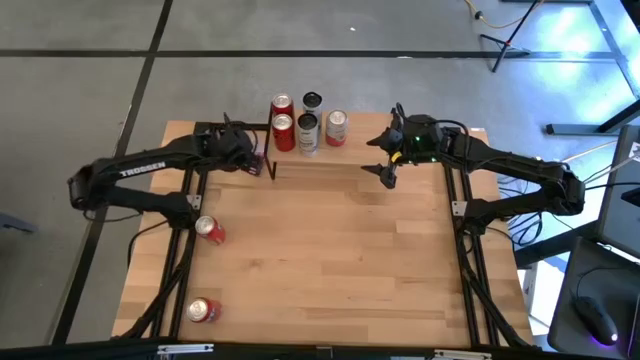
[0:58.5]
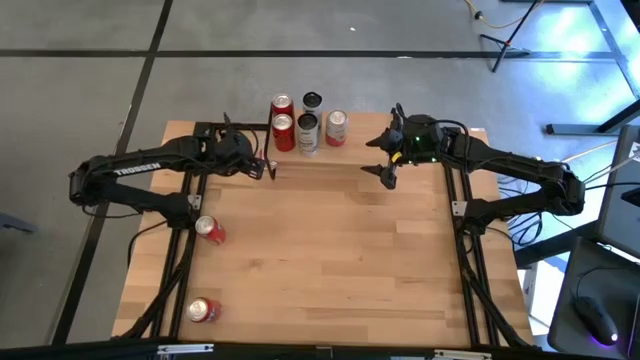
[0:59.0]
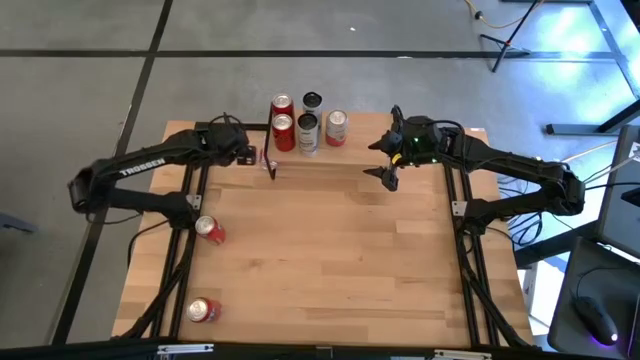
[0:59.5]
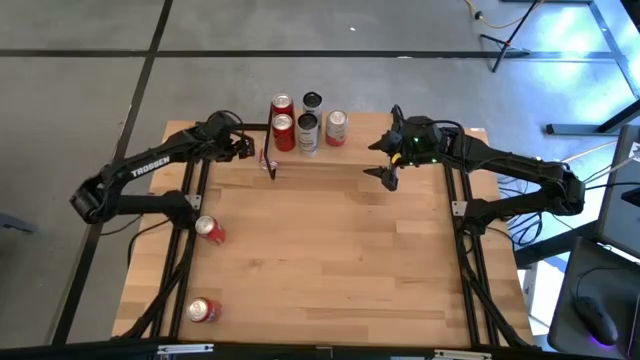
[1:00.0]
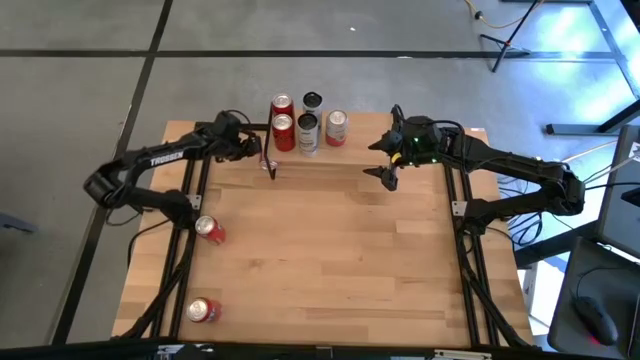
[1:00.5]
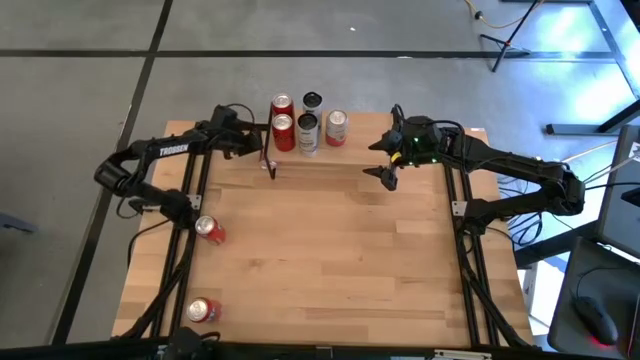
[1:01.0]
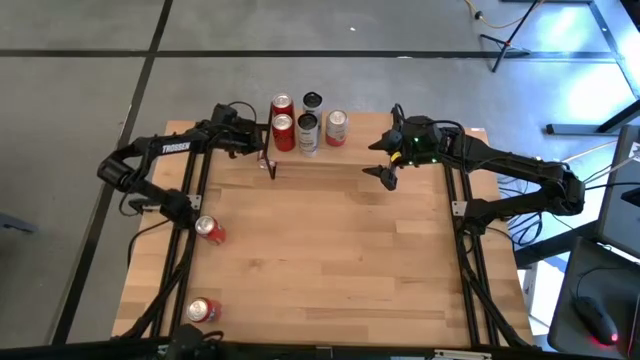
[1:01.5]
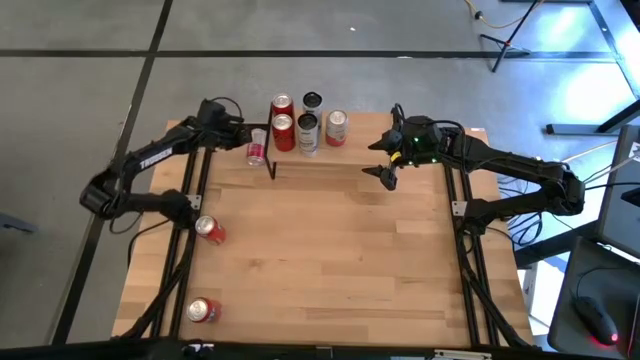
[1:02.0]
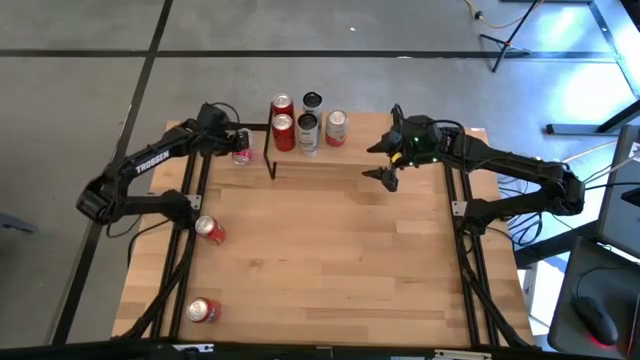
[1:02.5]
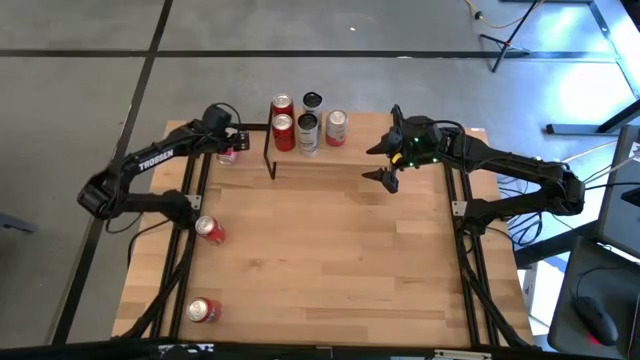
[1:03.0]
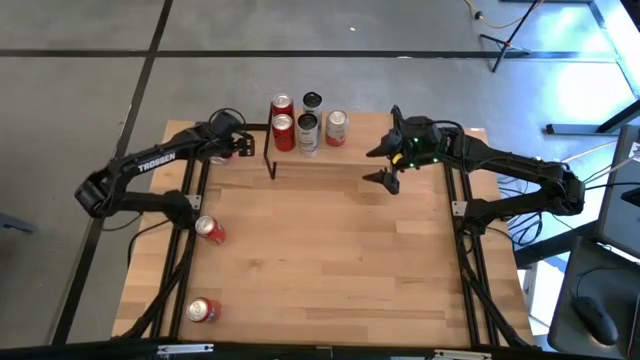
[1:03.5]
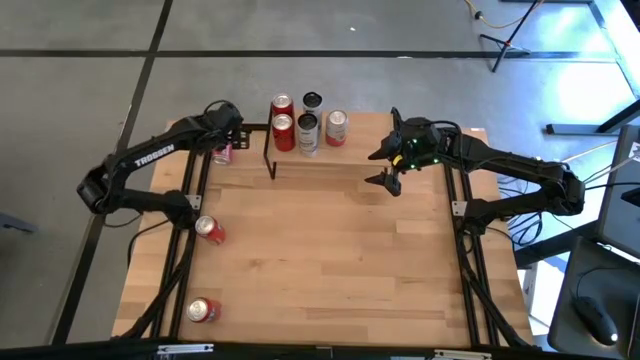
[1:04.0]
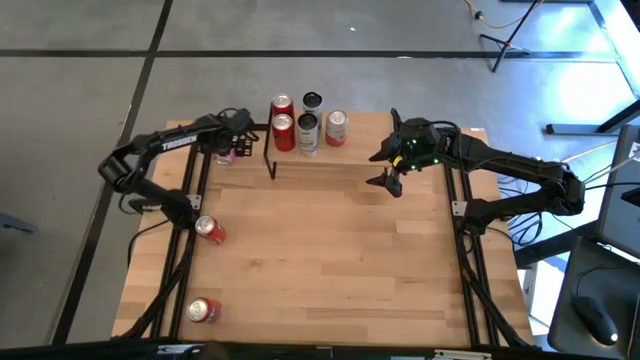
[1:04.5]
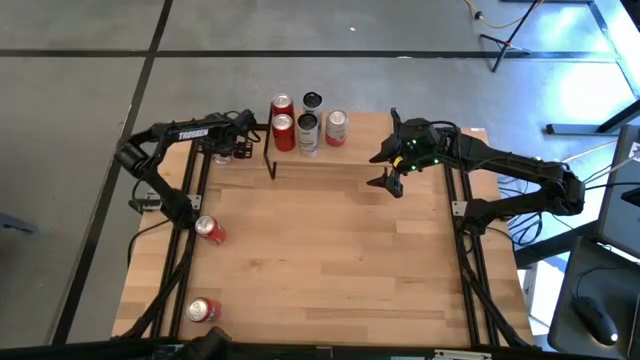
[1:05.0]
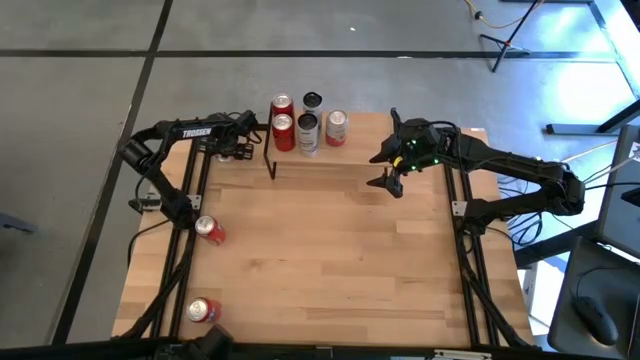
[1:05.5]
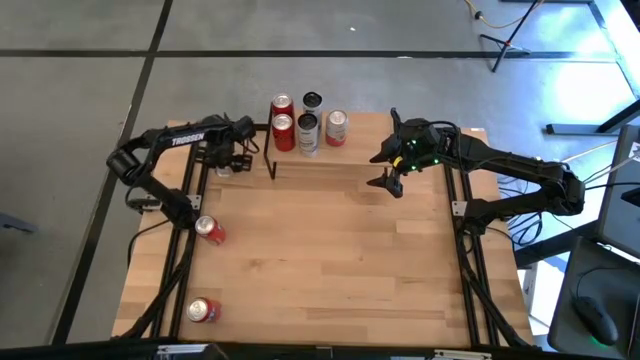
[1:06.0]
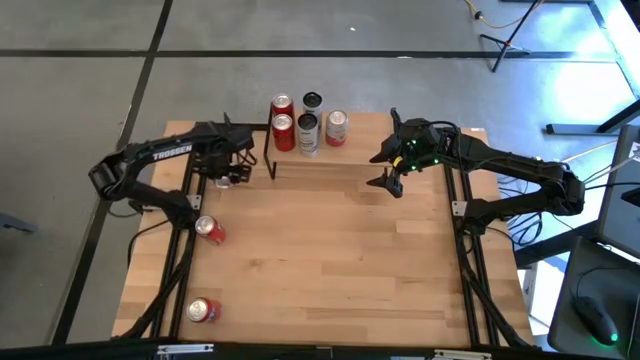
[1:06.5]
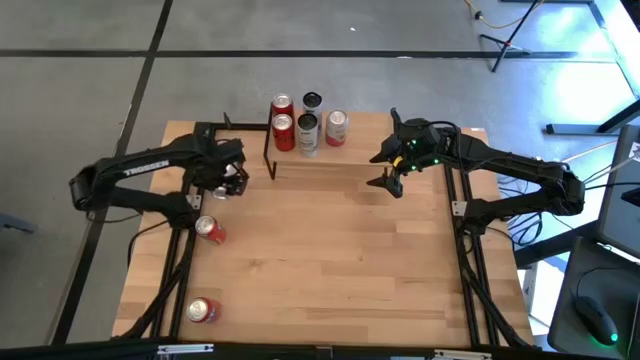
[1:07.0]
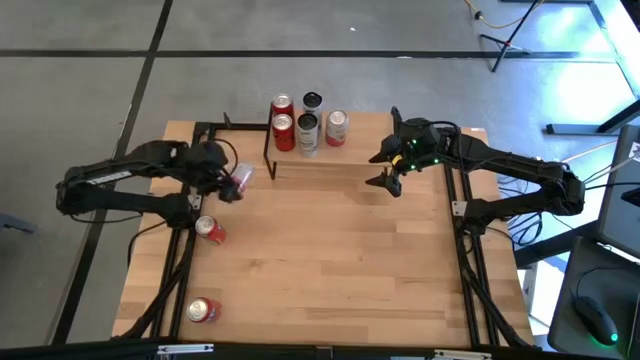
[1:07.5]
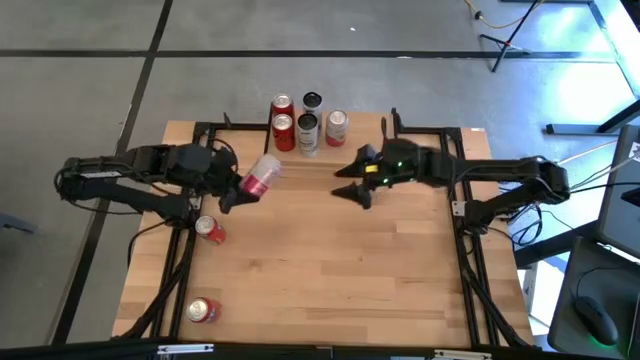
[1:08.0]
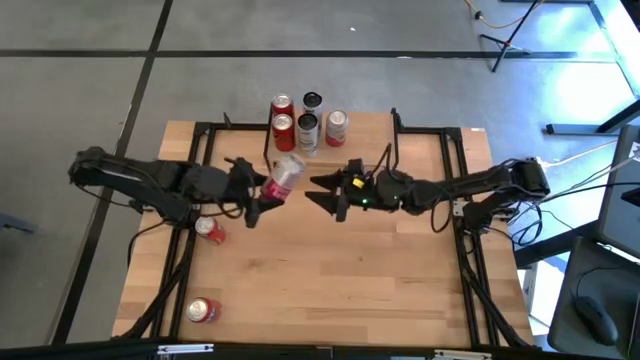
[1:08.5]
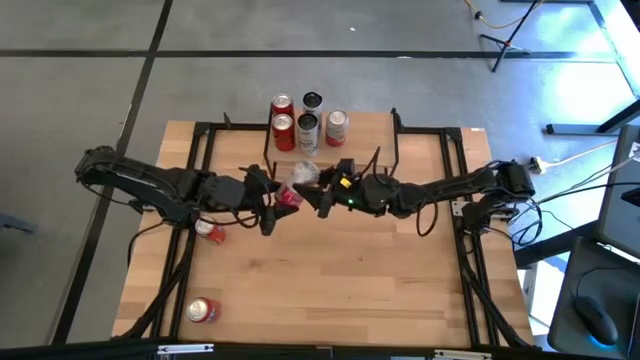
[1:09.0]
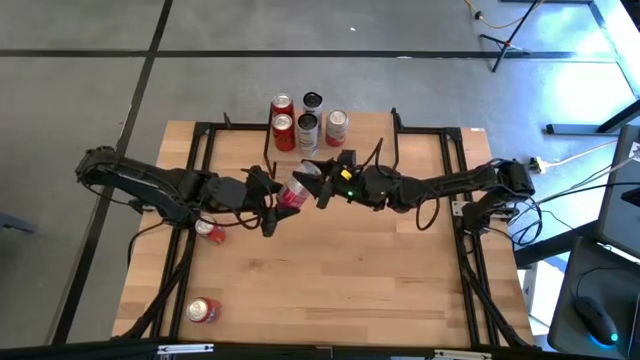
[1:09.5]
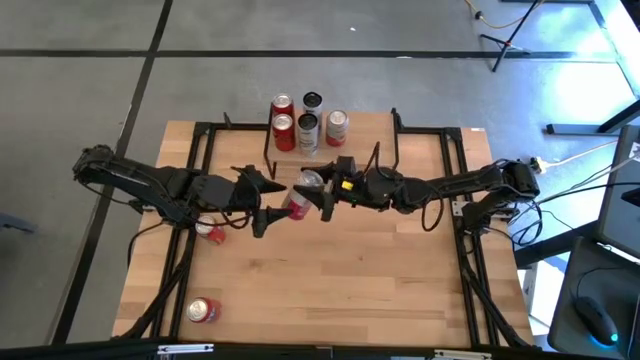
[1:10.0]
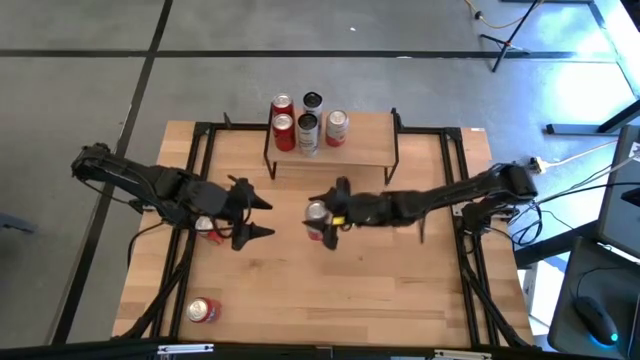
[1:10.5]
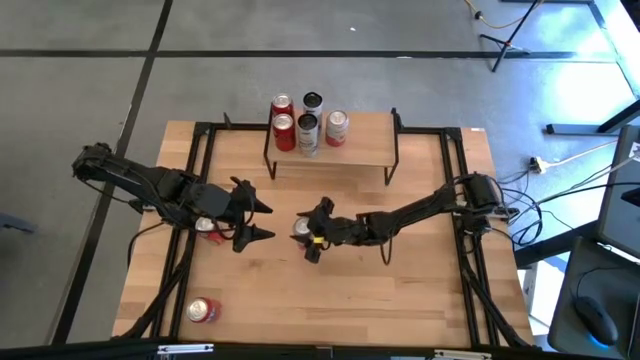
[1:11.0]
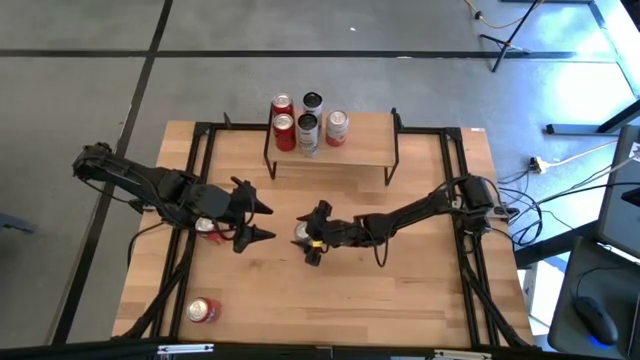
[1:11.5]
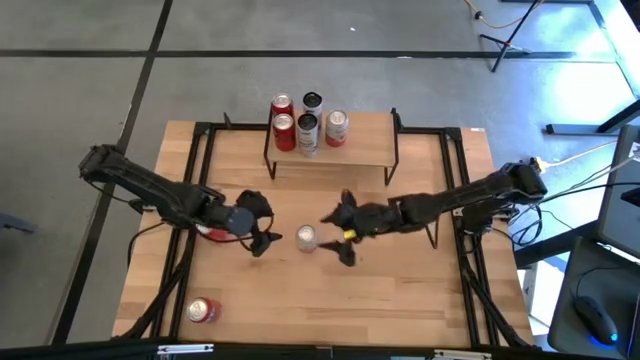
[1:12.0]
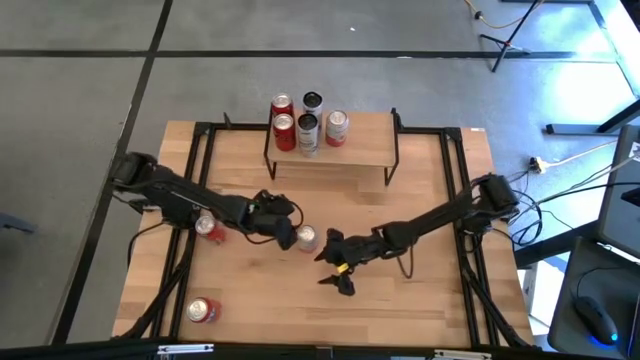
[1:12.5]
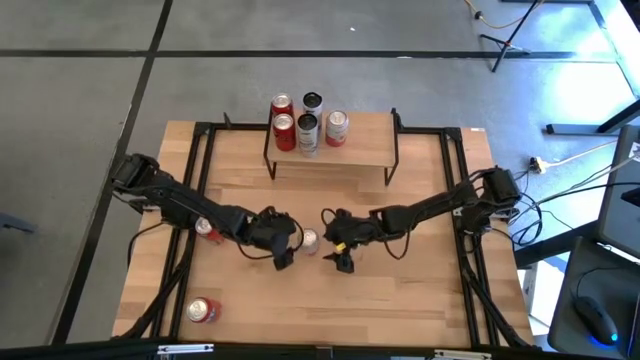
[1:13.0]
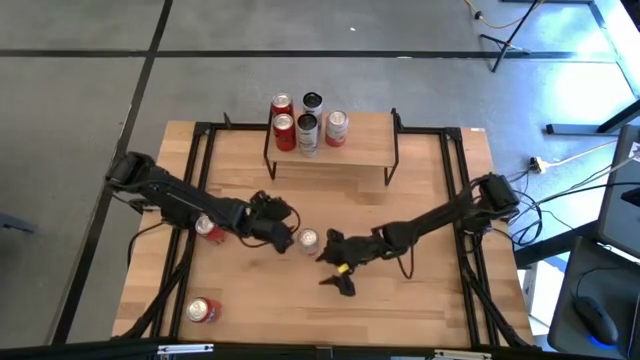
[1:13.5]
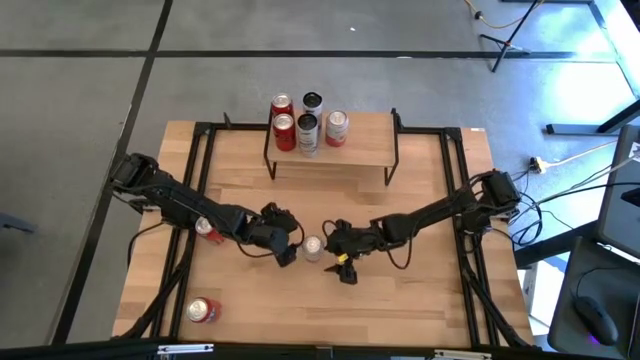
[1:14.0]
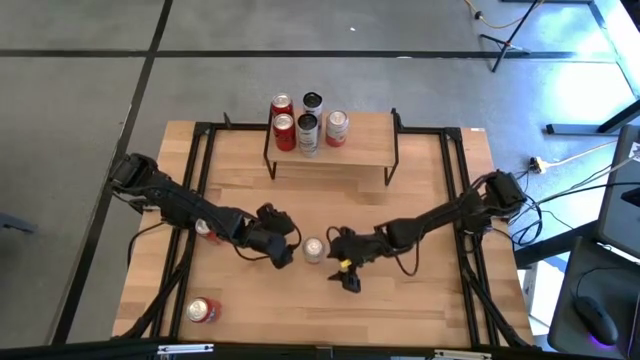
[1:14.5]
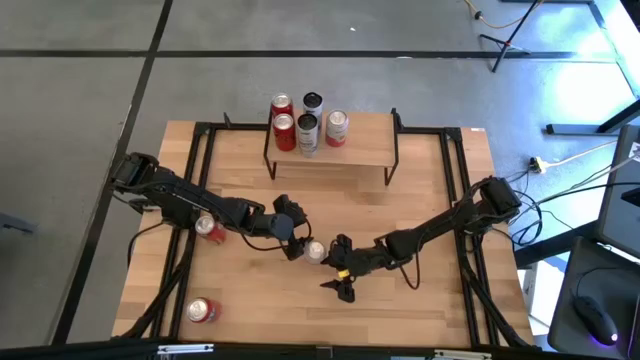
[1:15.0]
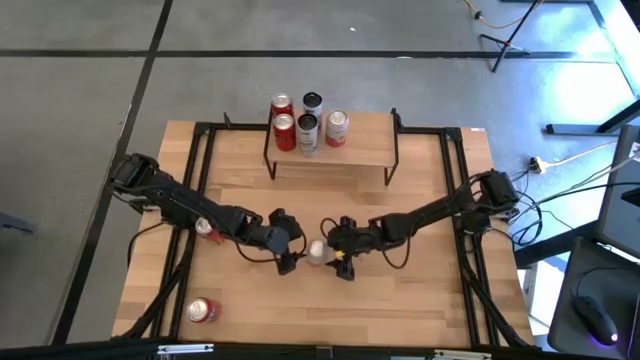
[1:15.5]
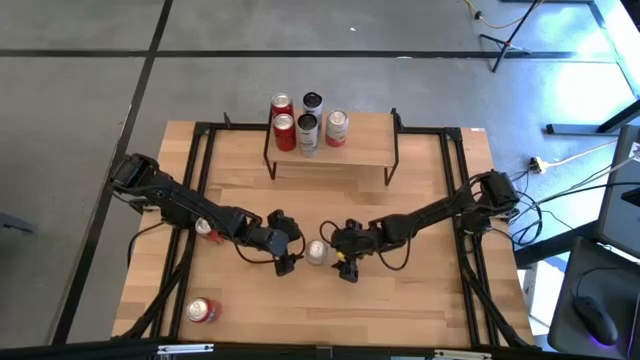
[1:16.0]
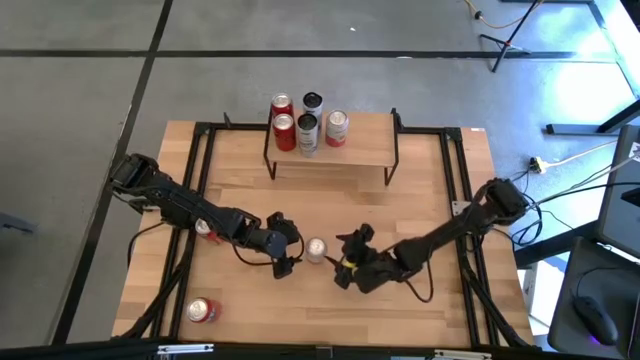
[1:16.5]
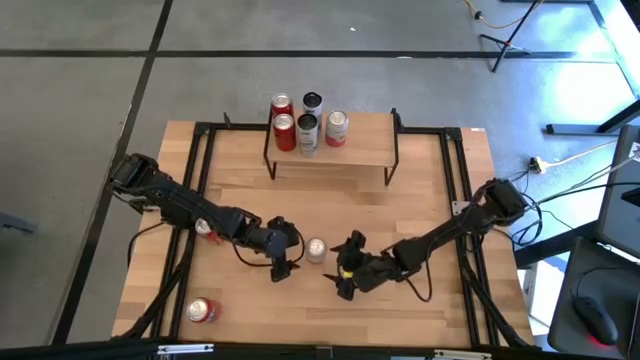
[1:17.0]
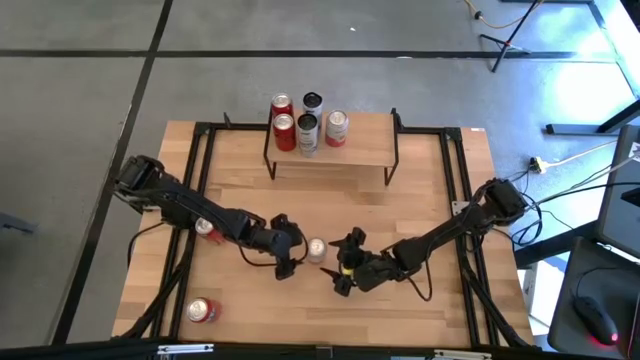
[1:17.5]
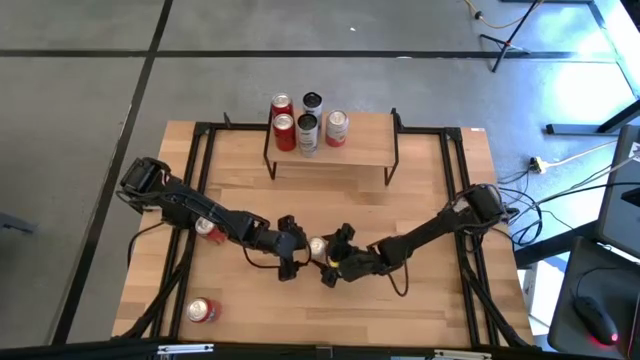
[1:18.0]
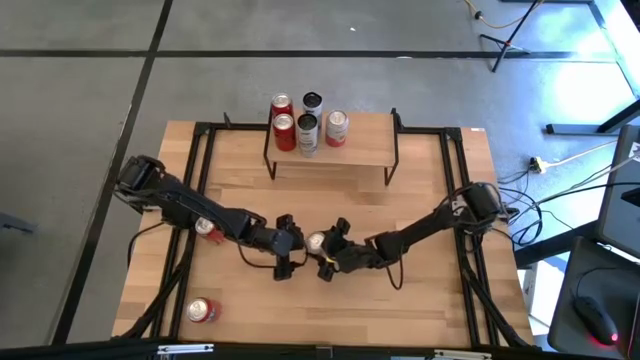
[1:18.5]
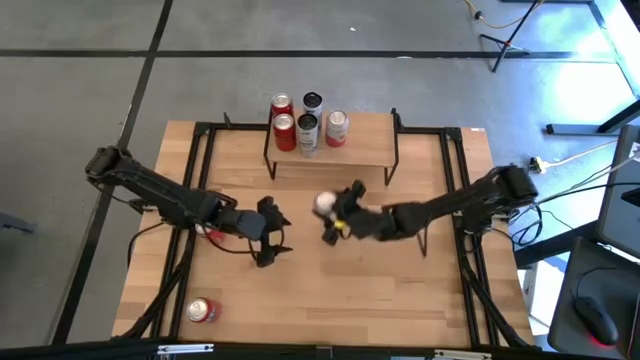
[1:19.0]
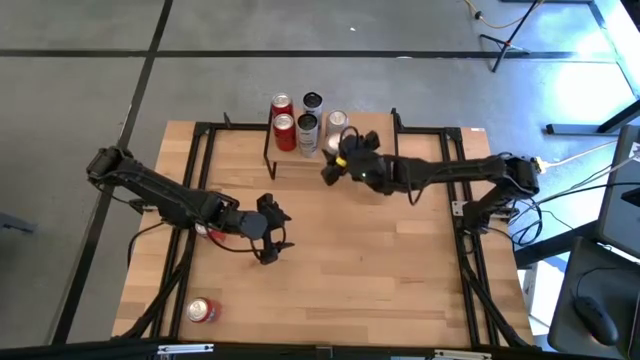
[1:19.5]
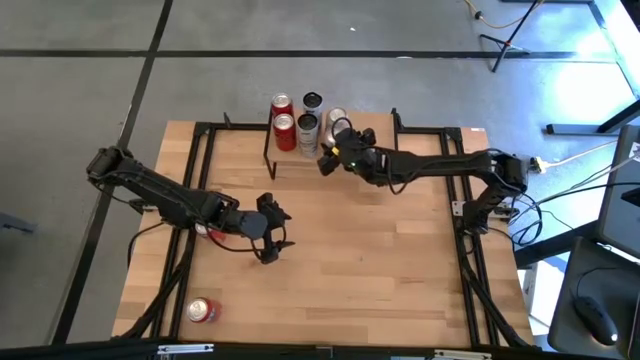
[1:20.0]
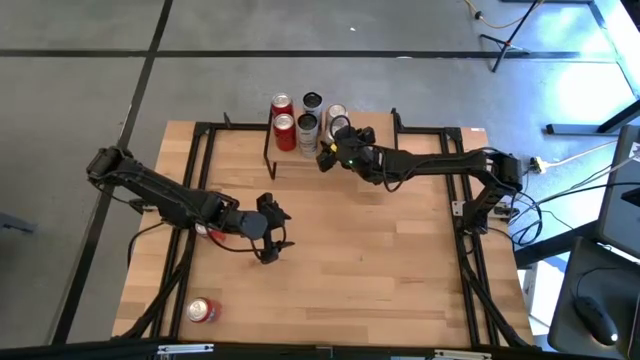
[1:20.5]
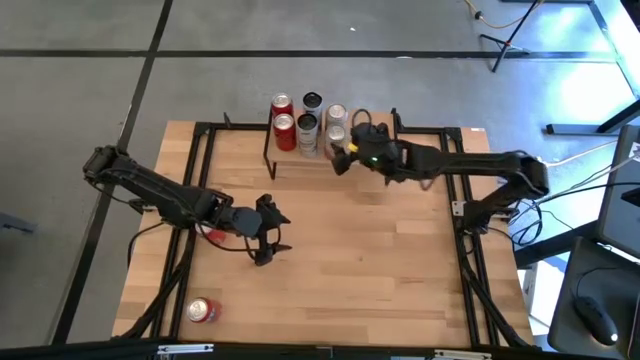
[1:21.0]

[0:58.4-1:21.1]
Task: Place canned beverage on shelf
Put the pink soda can on the shelf aligned with the other pink soda can
